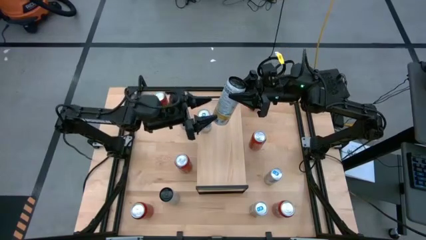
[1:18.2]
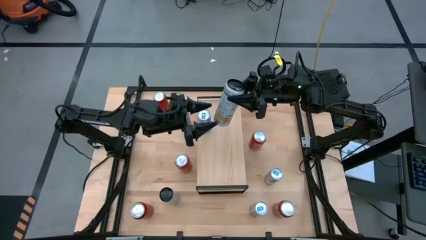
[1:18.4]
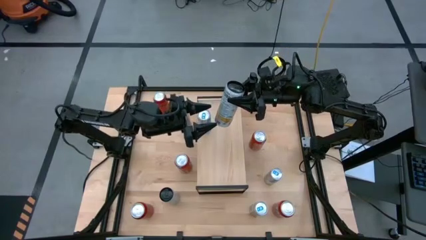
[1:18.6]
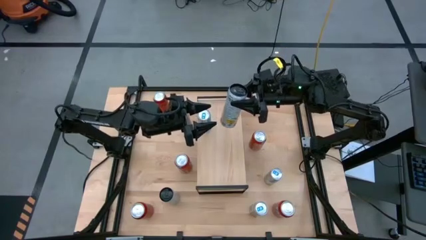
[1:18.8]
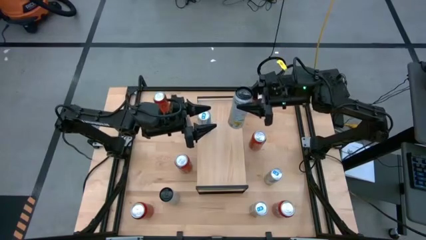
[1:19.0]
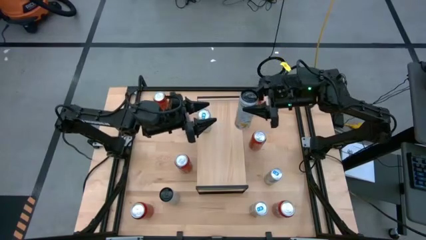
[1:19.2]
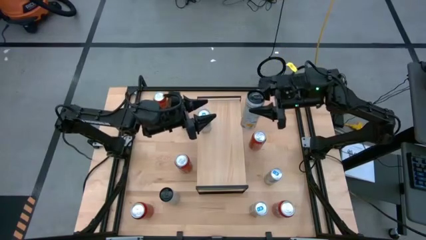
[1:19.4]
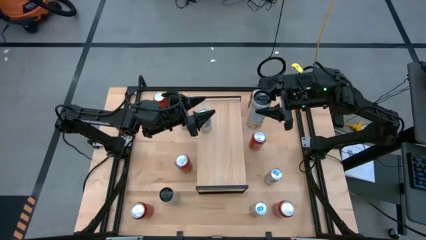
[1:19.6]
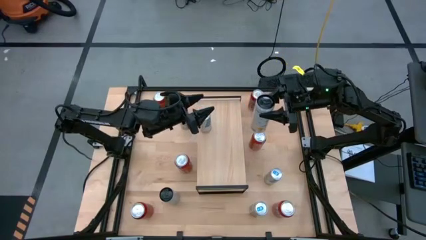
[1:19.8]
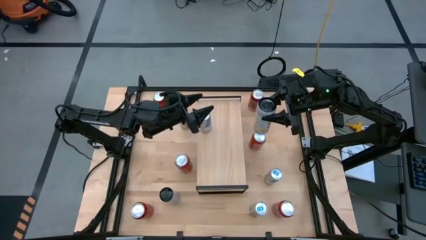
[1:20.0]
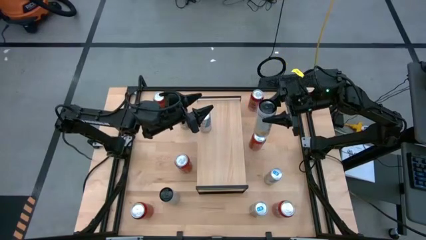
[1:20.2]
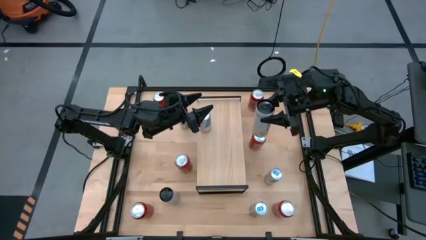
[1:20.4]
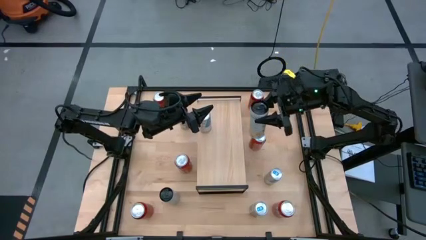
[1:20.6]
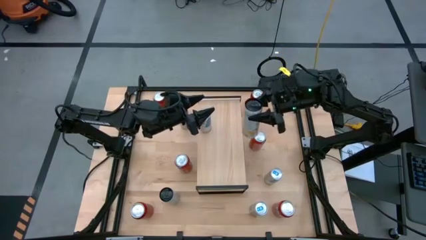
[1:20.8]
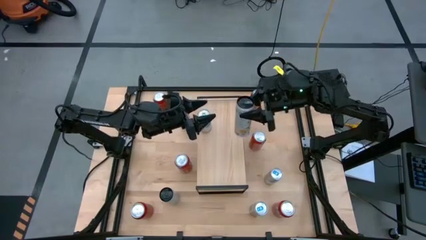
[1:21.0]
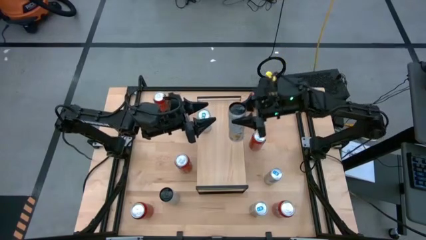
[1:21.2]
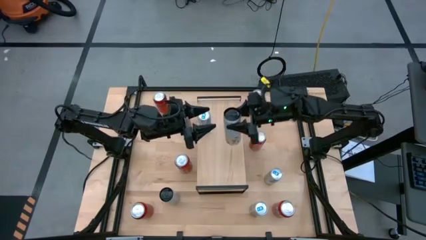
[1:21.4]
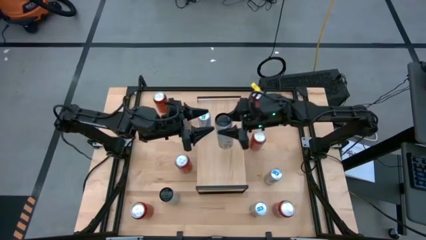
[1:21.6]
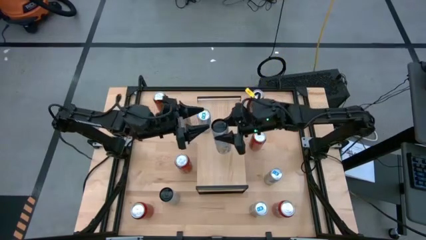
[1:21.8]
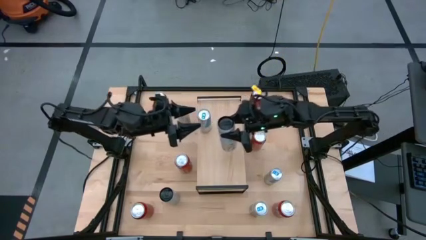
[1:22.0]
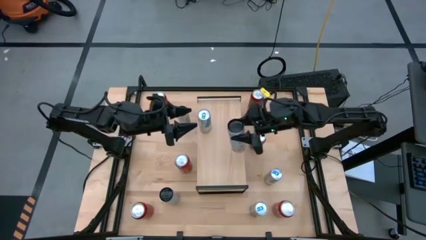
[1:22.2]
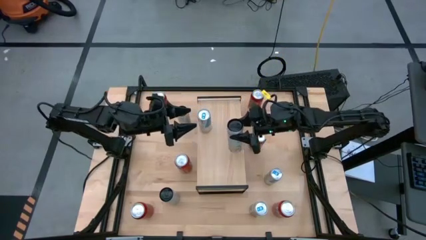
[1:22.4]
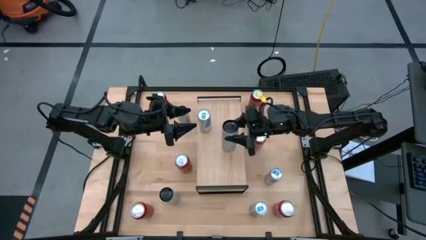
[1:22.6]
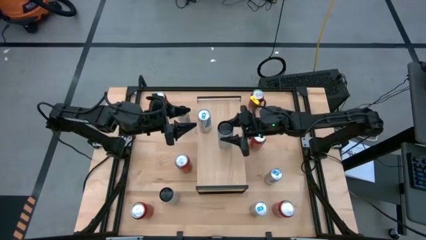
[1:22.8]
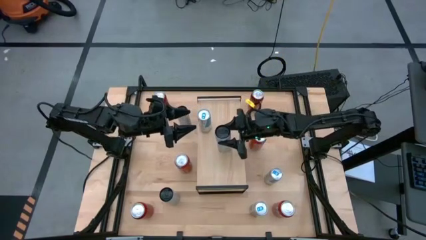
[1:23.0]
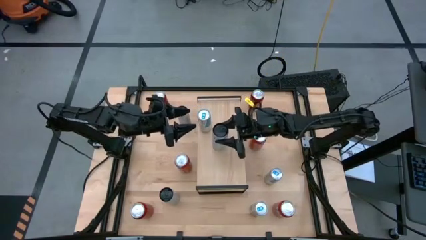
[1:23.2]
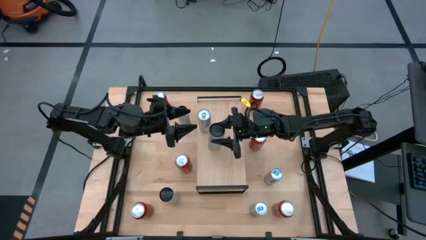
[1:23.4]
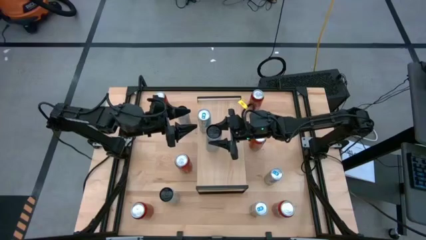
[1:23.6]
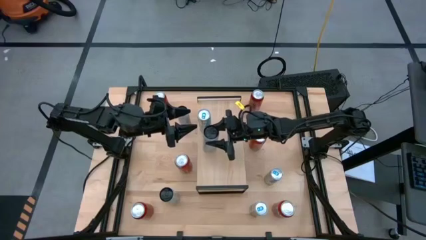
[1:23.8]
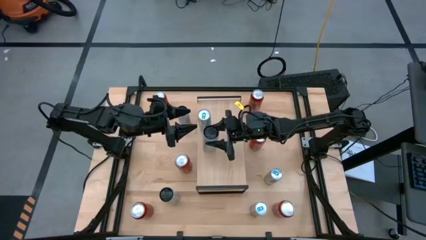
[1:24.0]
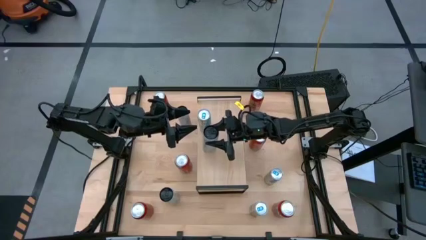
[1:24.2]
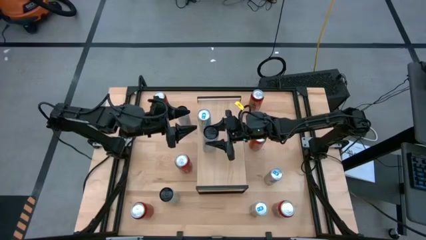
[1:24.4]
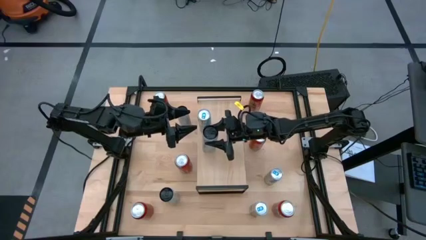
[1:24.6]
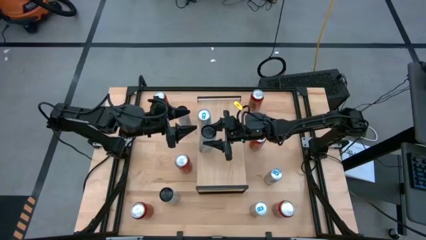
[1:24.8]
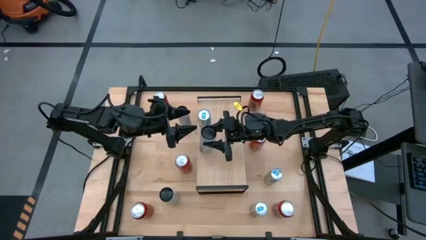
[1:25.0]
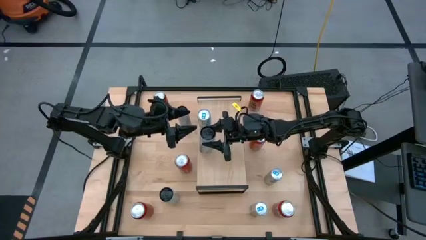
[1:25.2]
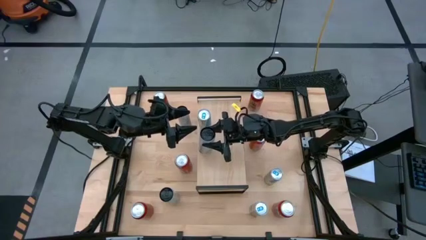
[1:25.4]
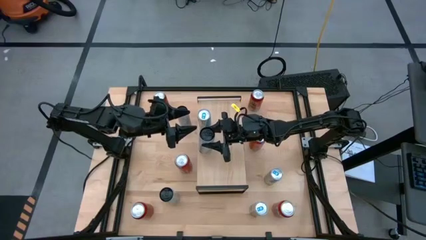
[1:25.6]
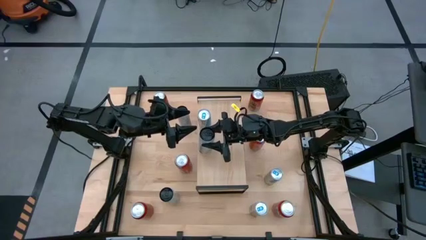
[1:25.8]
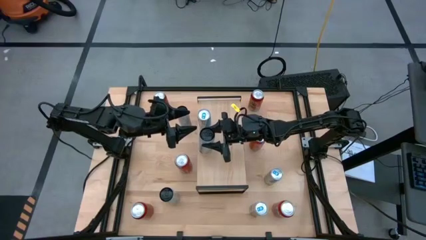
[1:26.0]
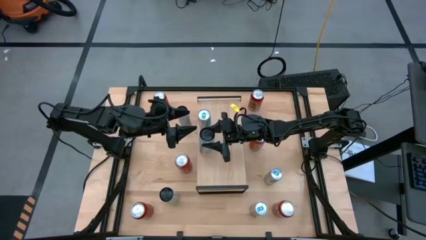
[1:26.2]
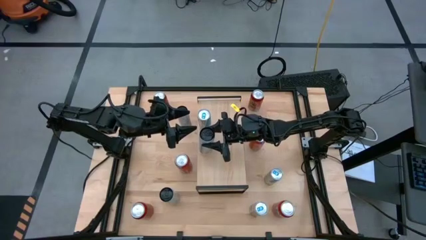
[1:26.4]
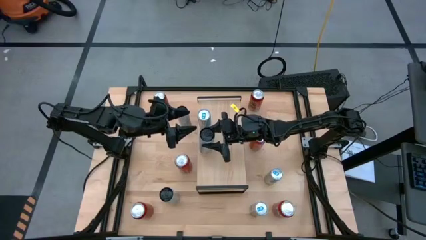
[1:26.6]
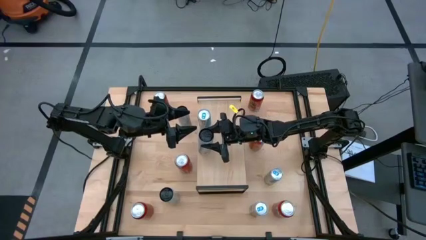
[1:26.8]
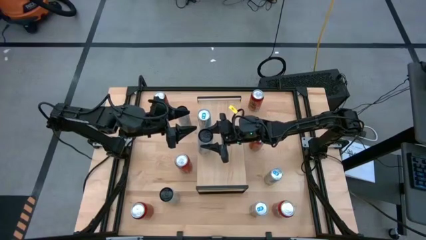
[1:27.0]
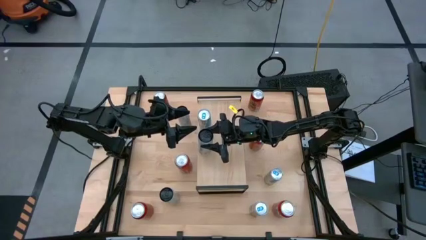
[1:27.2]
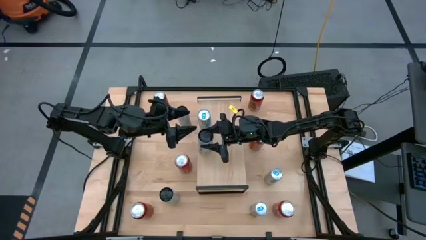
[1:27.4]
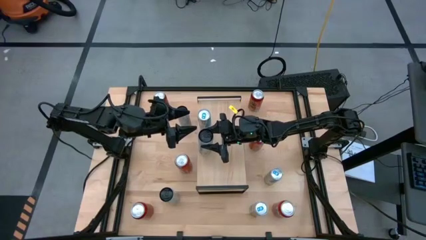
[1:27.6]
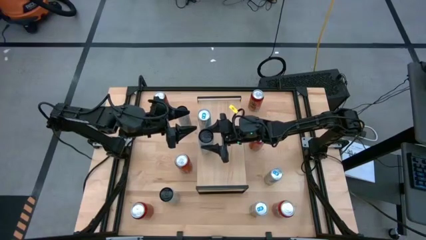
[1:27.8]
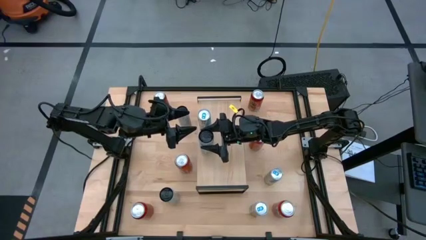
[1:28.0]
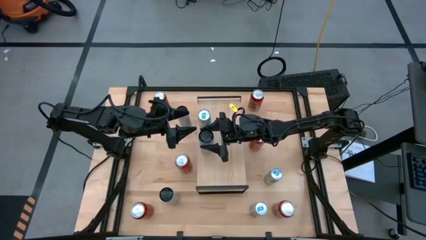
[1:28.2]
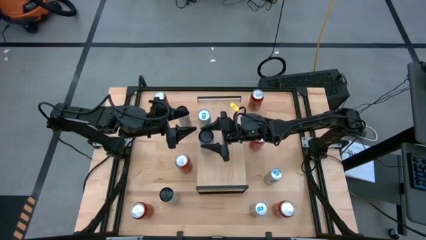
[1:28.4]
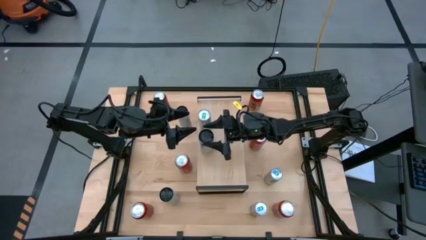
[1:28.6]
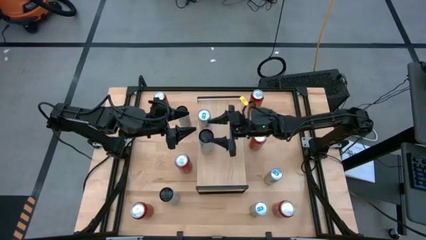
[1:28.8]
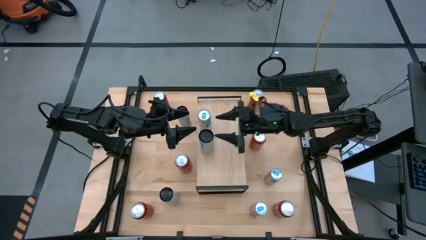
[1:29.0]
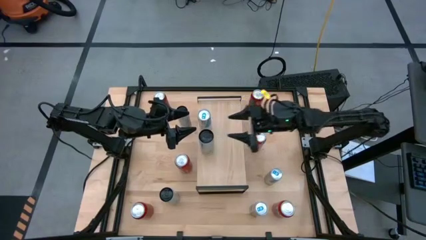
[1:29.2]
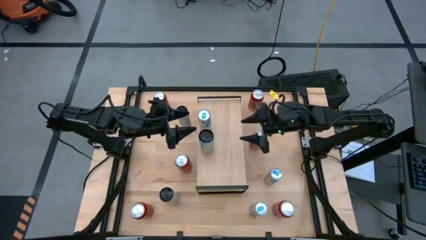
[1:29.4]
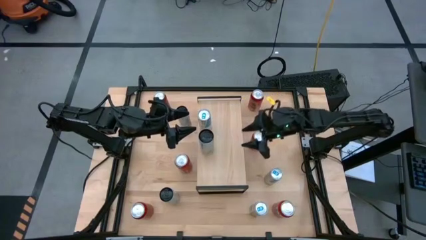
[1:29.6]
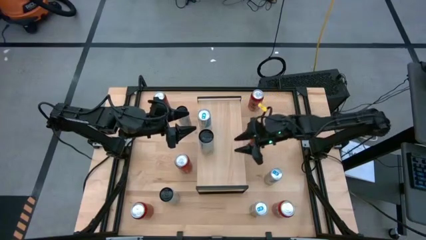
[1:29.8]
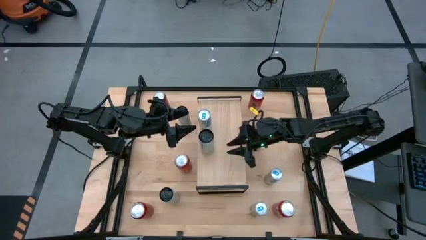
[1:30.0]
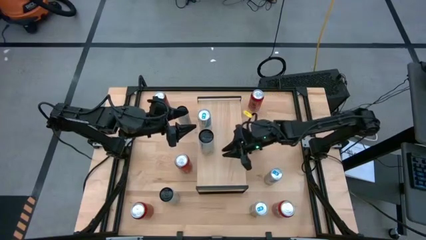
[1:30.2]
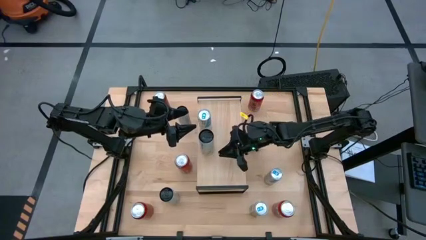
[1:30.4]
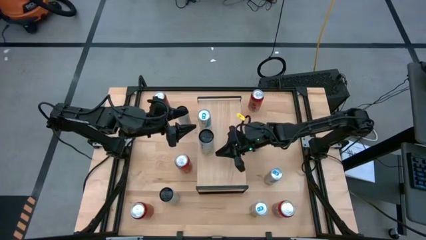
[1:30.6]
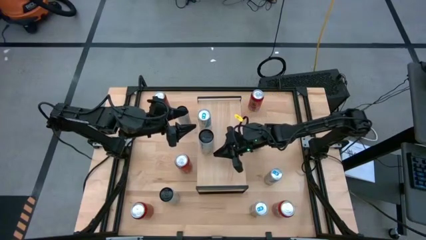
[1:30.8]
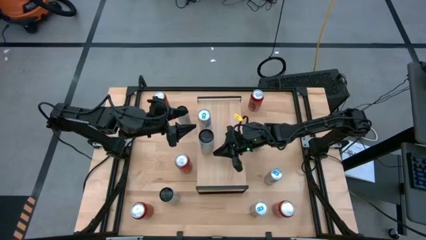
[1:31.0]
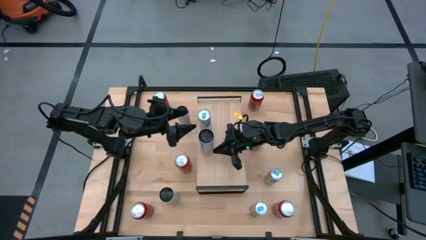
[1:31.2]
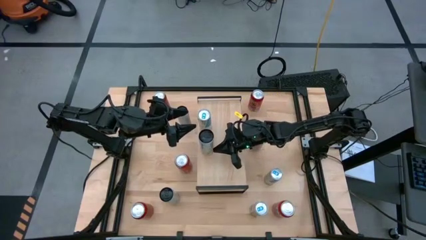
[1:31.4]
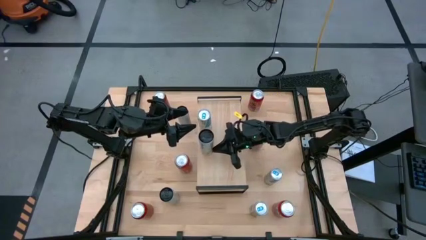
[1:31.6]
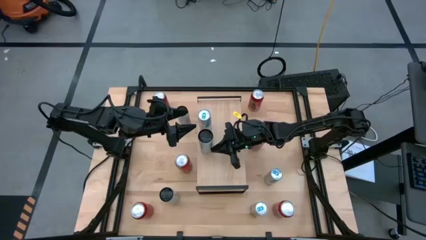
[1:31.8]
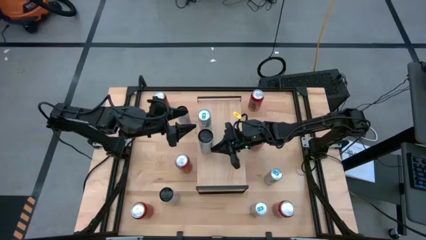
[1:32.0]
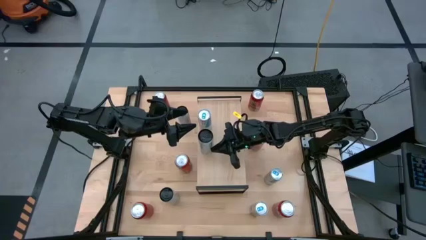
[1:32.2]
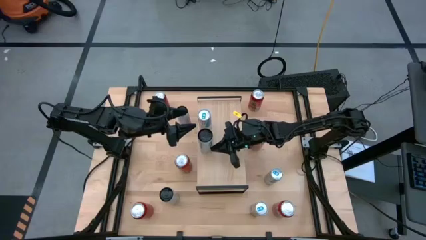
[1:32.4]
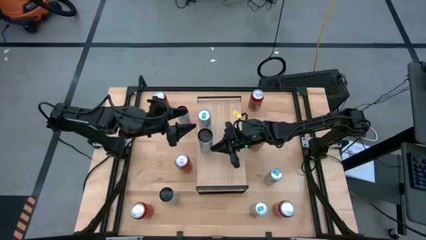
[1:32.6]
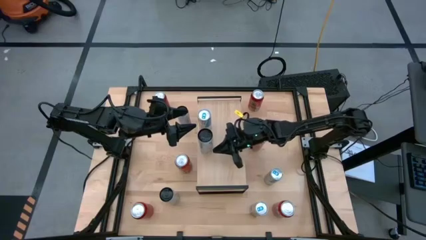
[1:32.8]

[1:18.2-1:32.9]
Task: Place canned beverage on shelf
Put the top right white and yellow soda can on the shelf
